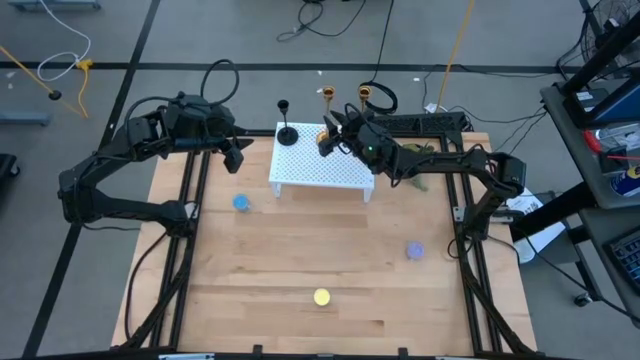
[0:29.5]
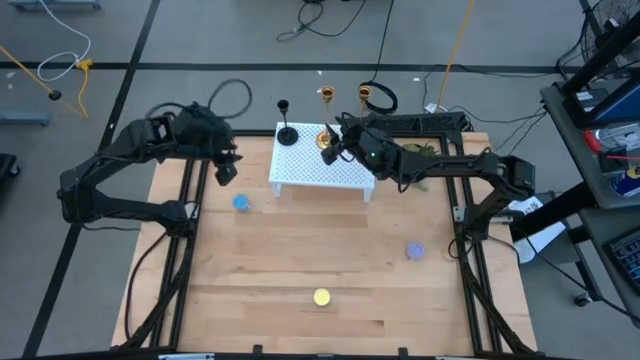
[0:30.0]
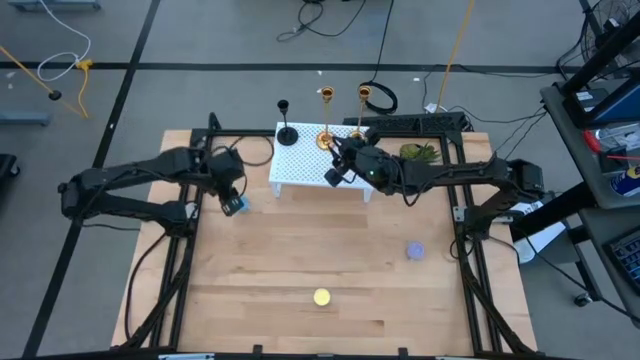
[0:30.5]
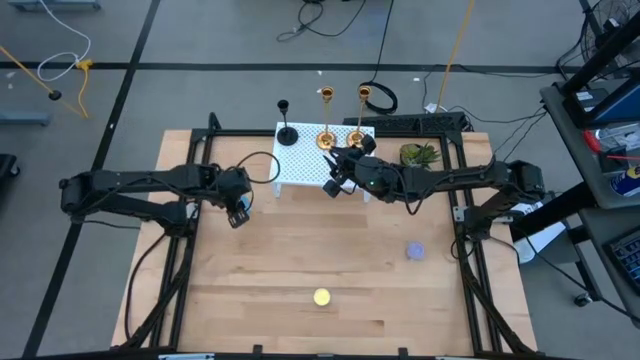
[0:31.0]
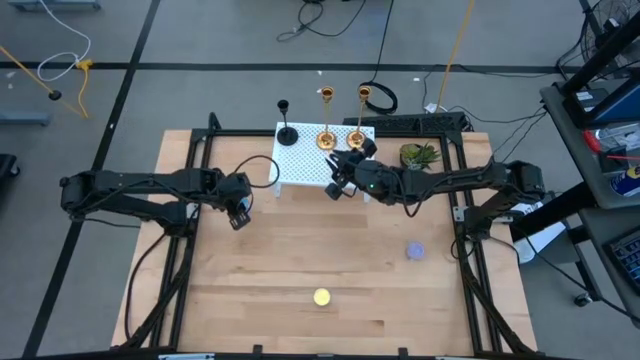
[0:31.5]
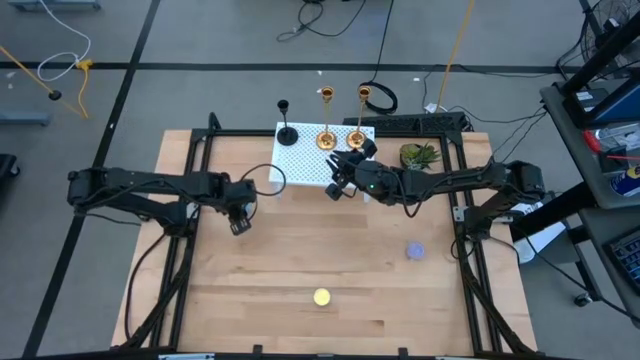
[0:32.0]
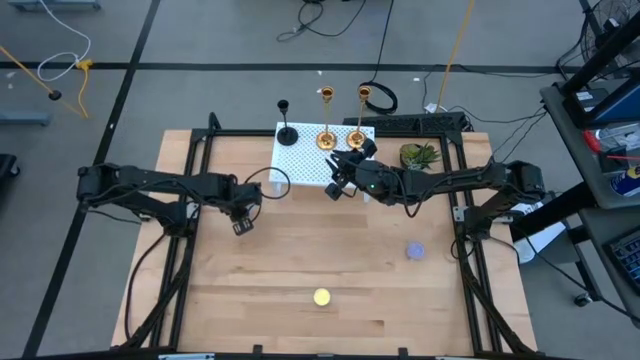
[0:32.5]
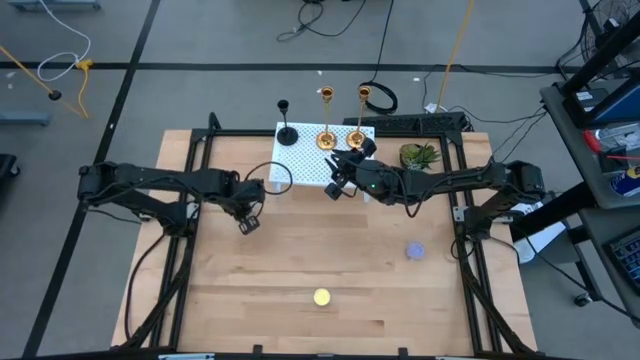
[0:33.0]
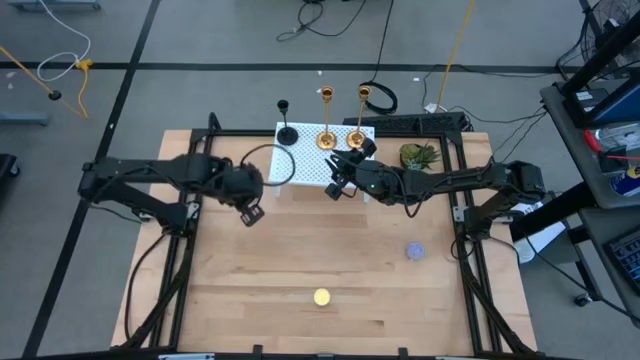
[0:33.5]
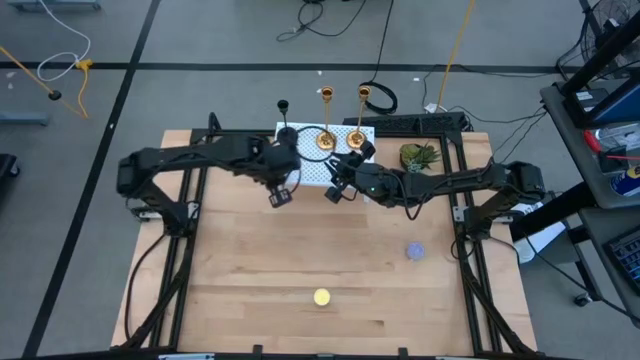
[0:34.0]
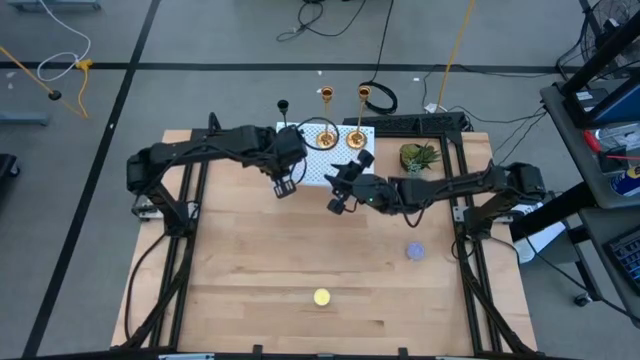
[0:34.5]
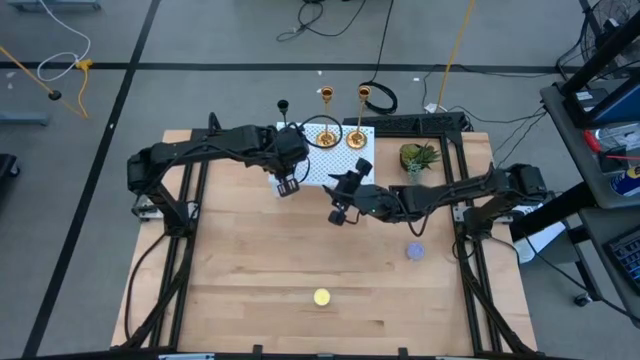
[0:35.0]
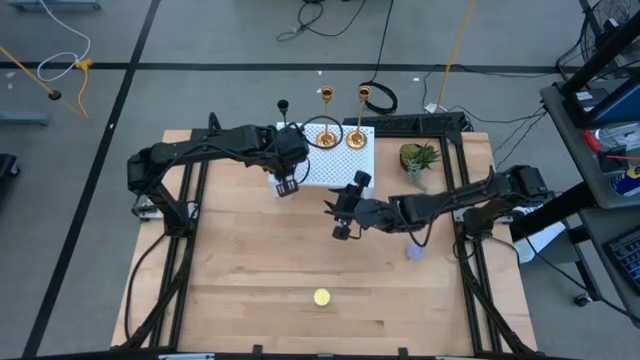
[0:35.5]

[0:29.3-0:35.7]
Task: Pick & Place candle stick holders
Put the blue scented candle on the shelf

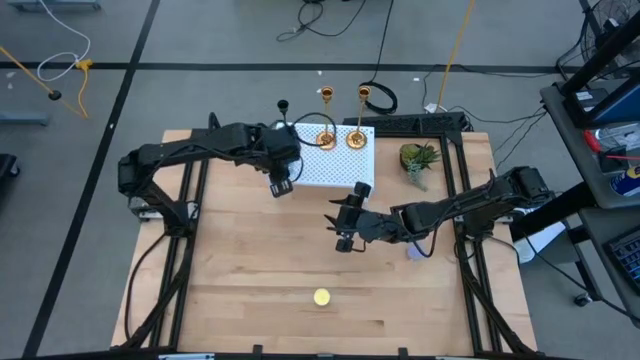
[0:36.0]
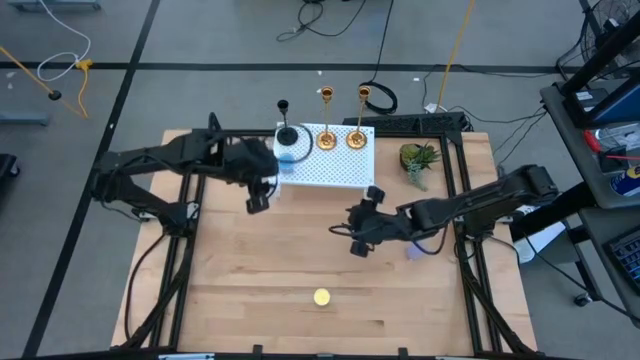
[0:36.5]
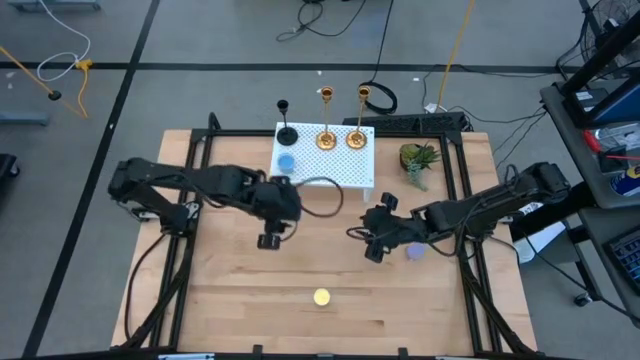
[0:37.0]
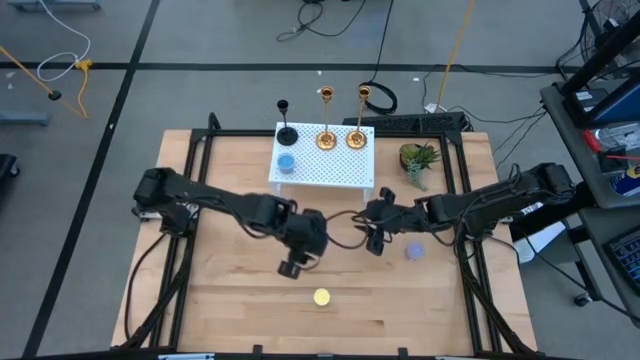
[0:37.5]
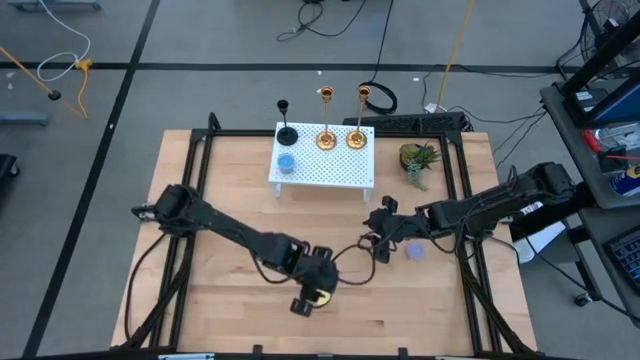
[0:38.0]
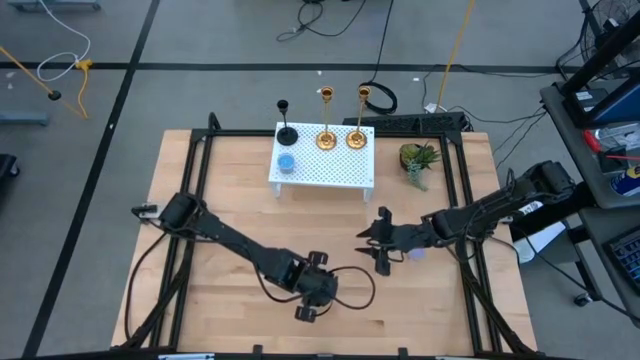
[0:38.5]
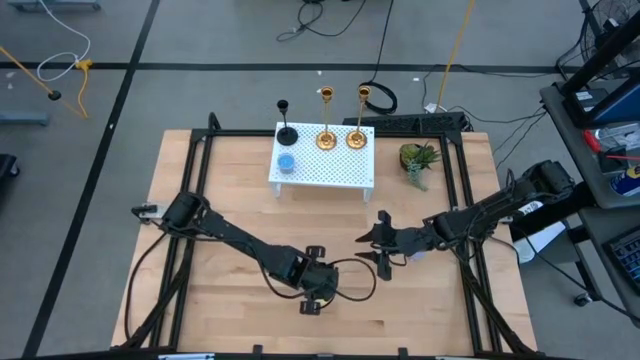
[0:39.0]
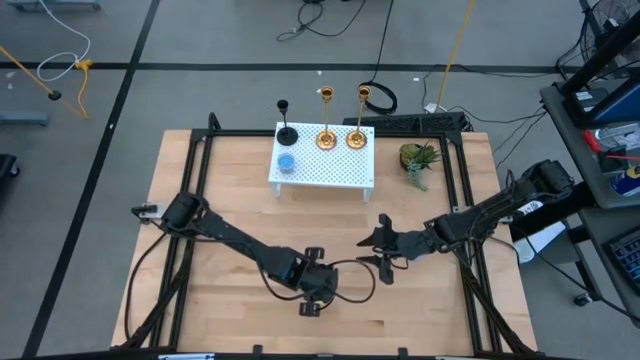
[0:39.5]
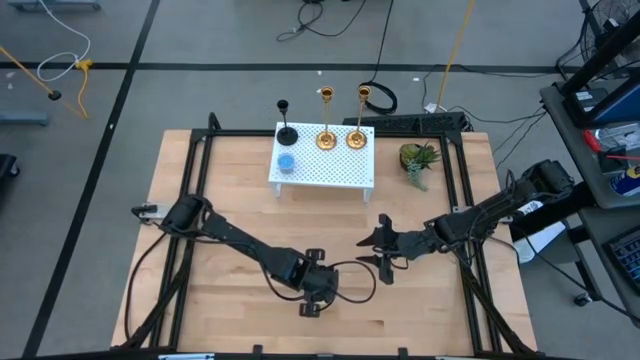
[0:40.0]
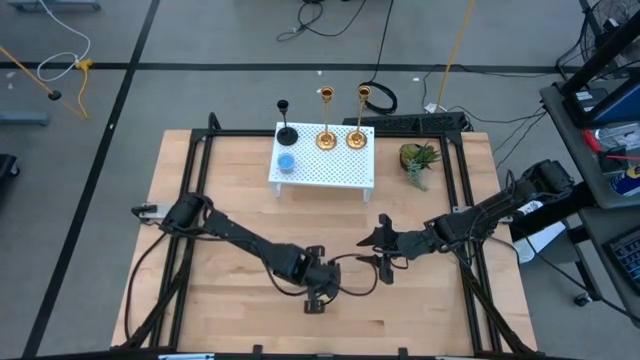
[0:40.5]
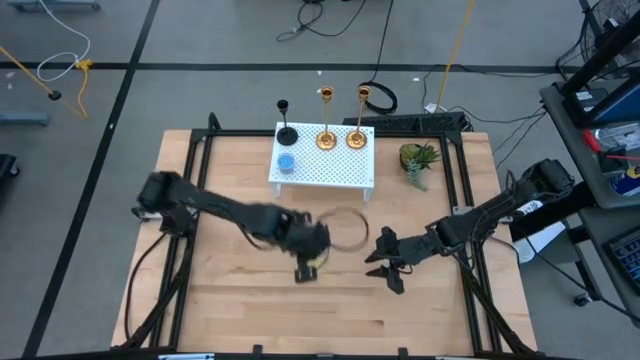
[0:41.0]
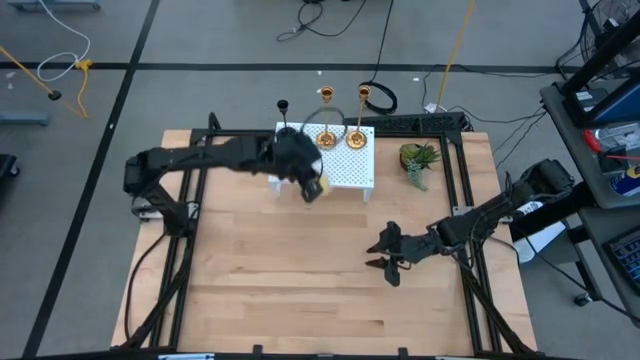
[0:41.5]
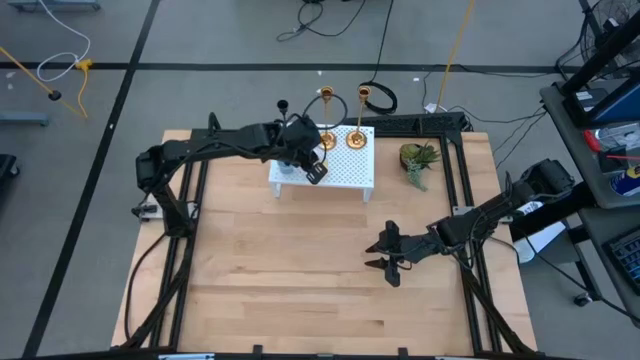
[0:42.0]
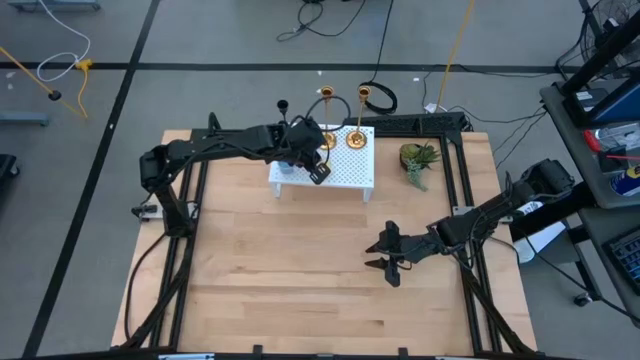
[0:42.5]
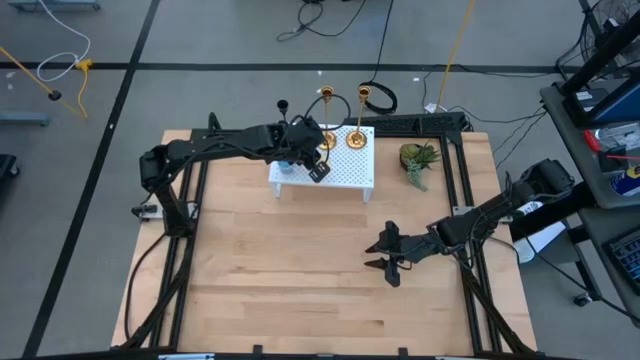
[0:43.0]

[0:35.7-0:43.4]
Put the yellow scented candle on the shelf

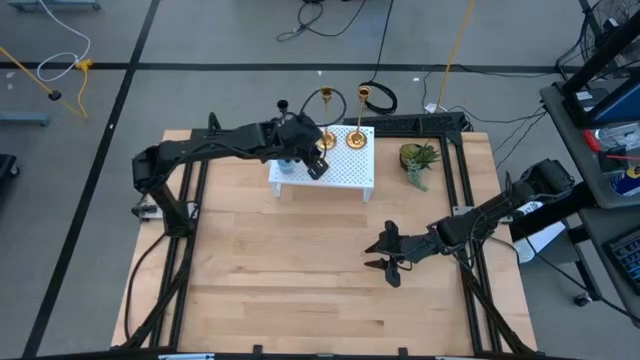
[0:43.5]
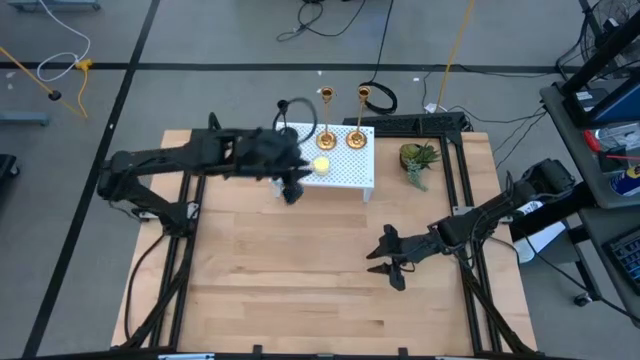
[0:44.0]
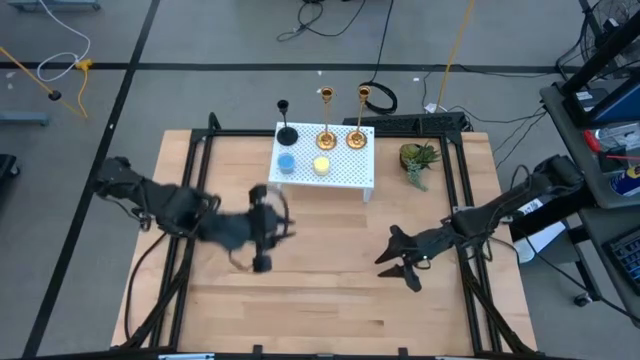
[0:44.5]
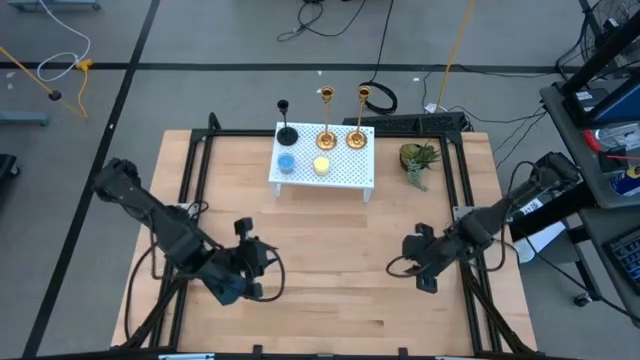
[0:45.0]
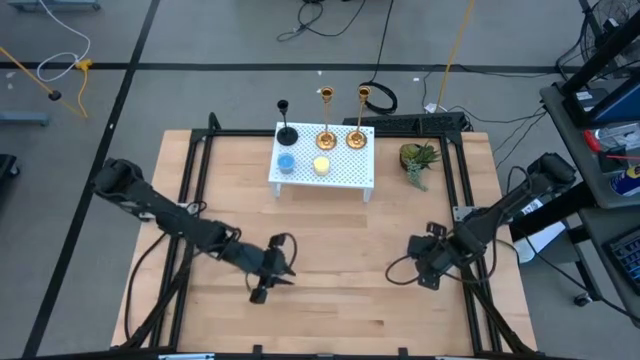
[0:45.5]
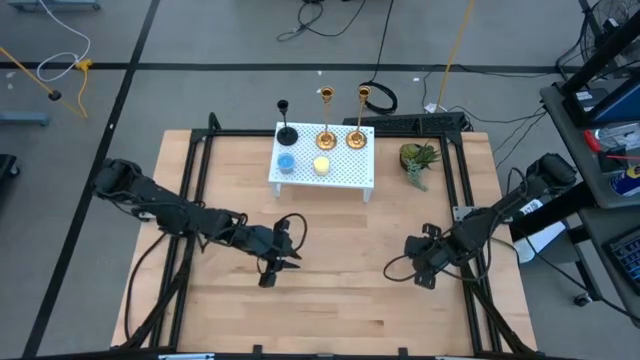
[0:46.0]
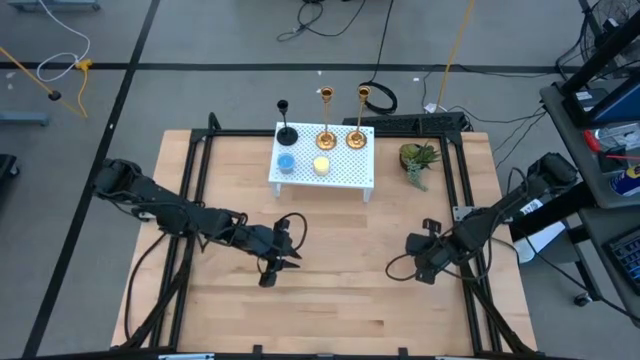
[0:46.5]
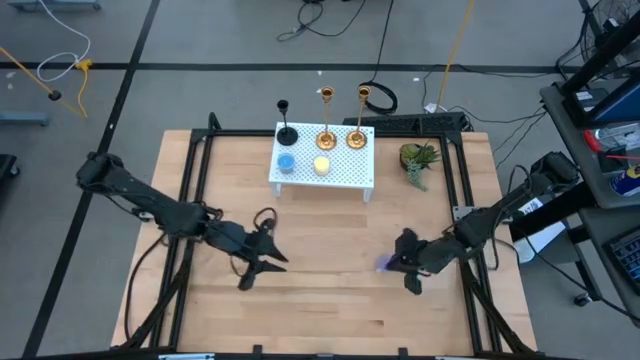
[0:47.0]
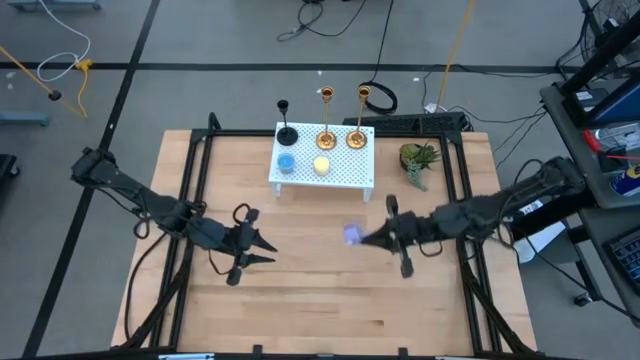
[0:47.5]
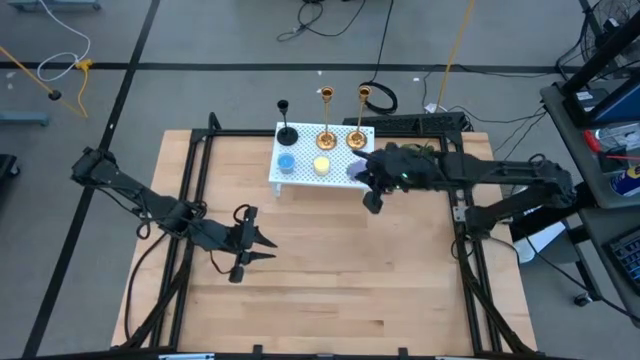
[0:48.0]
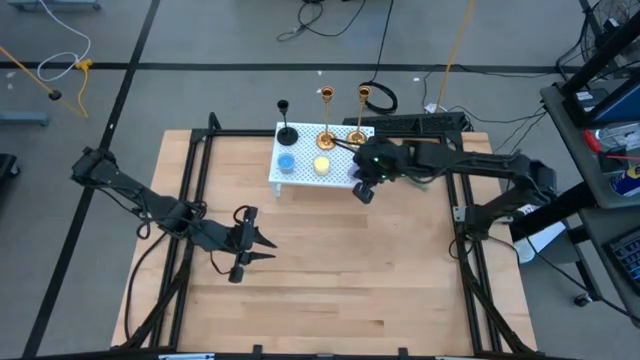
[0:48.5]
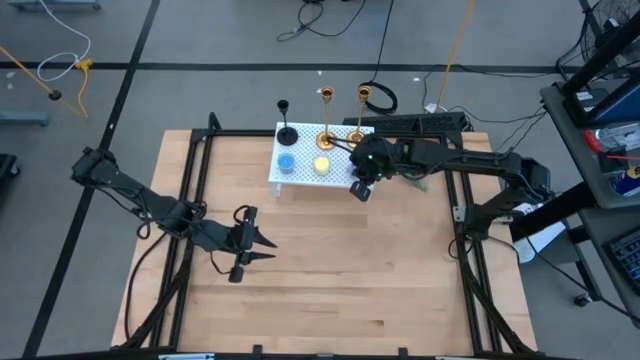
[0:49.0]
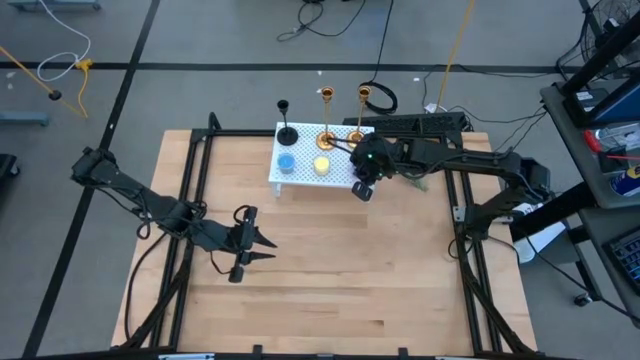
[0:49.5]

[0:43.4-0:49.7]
Put the purple scented candle on the shelf

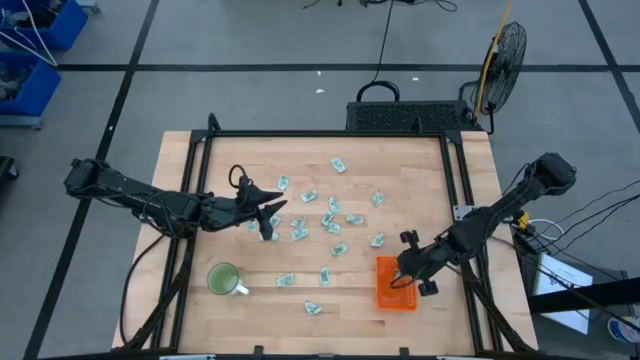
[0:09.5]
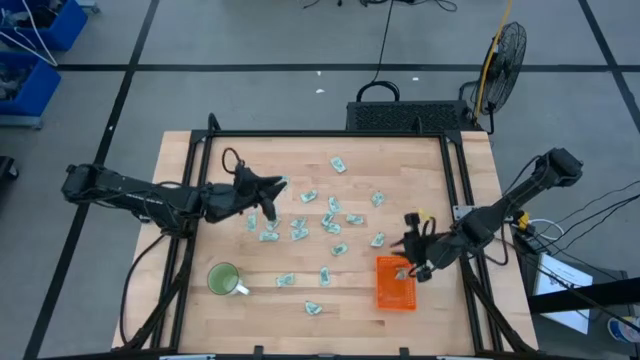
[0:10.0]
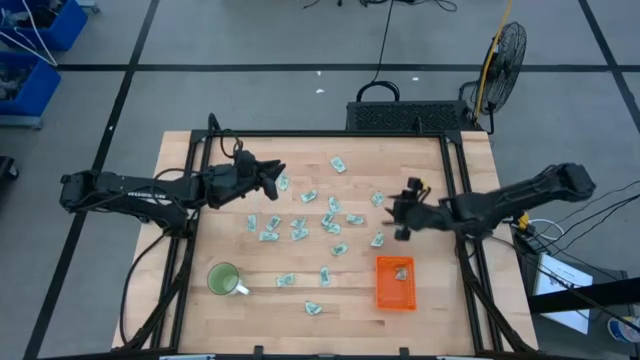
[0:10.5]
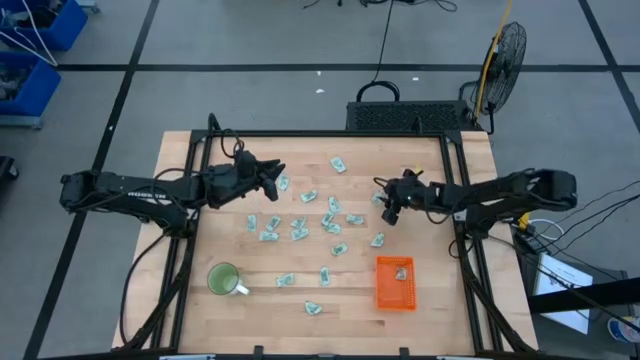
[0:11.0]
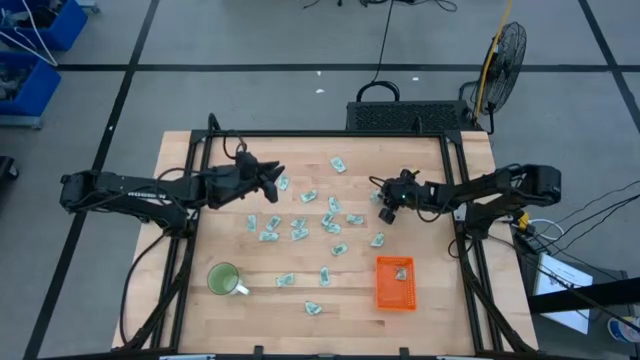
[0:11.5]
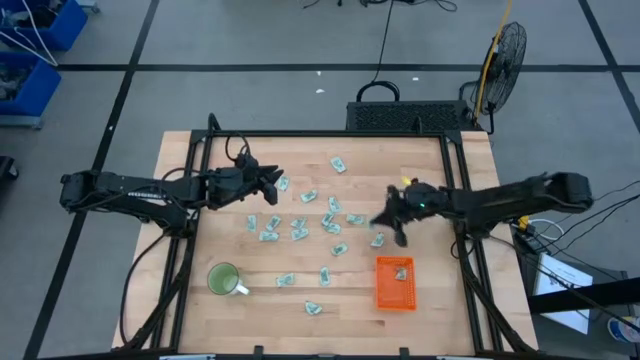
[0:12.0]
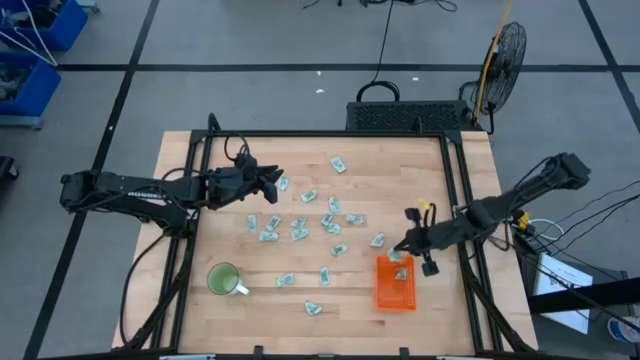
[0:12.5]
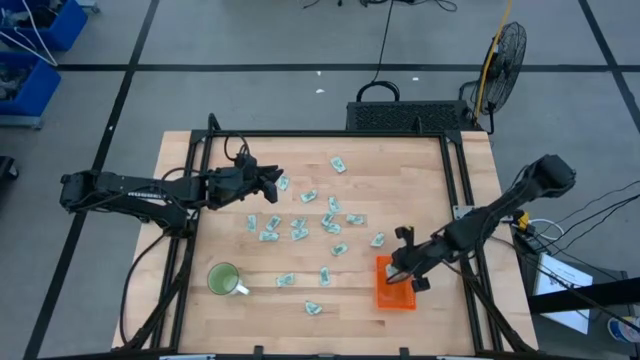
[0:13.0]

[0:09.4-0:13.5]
Task: Pick and place Stevia / Truvia into bins
Put the stevia packet into the orange basket
